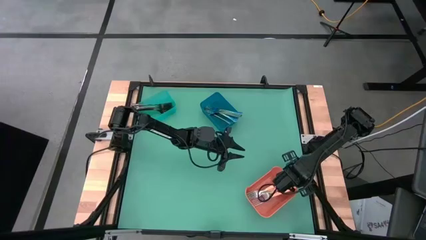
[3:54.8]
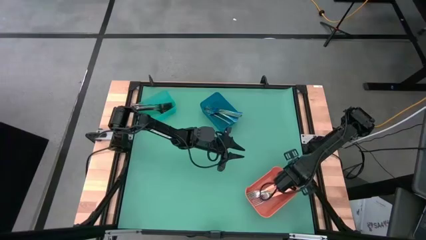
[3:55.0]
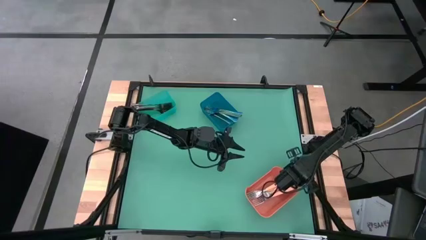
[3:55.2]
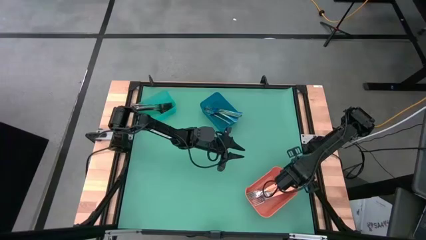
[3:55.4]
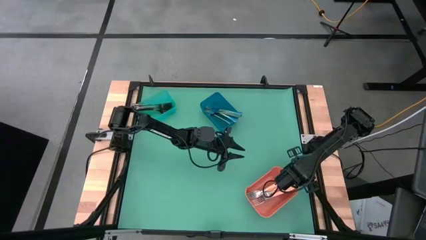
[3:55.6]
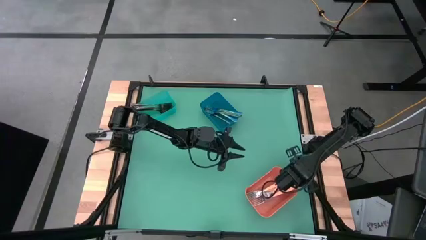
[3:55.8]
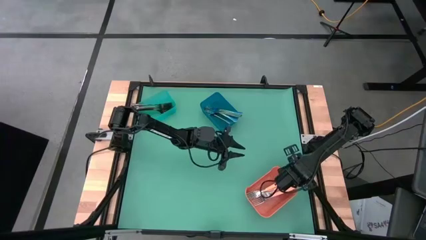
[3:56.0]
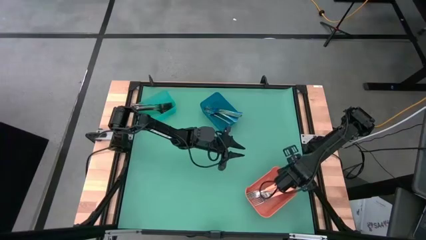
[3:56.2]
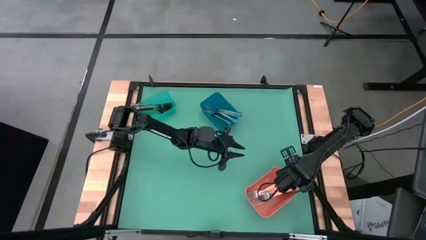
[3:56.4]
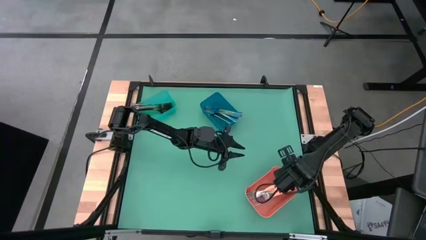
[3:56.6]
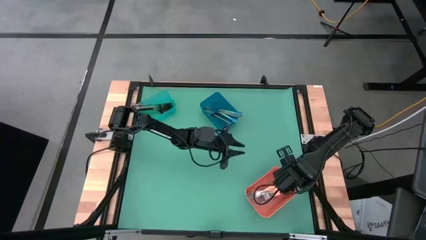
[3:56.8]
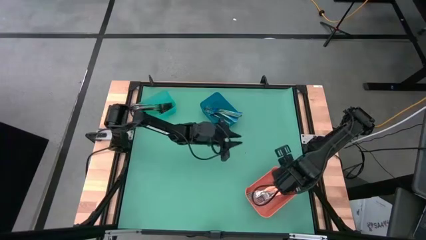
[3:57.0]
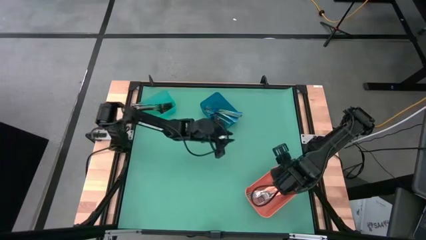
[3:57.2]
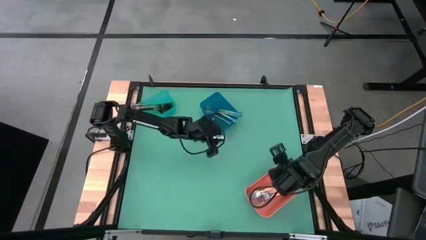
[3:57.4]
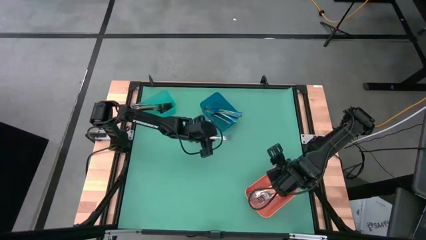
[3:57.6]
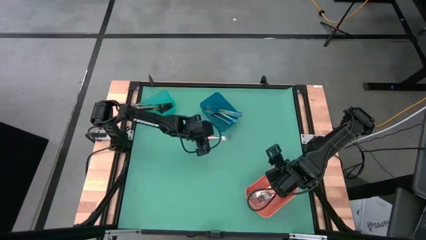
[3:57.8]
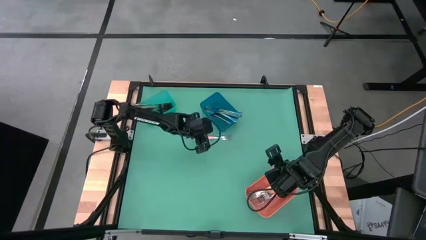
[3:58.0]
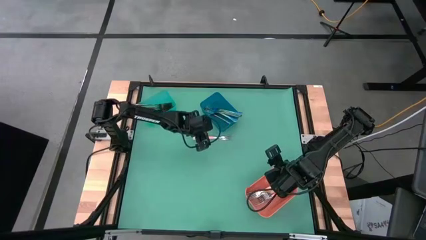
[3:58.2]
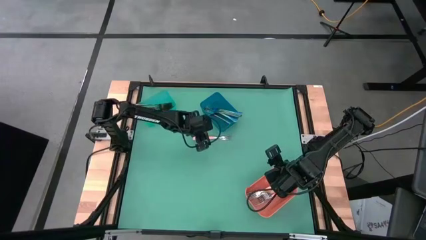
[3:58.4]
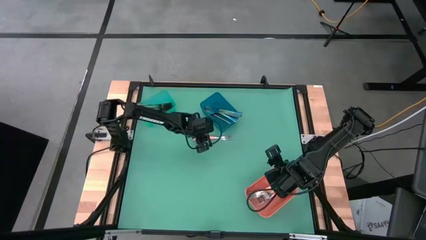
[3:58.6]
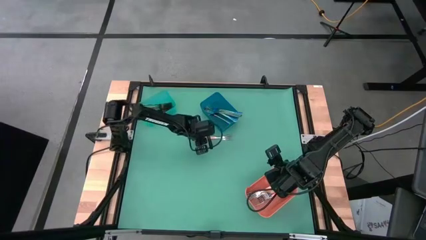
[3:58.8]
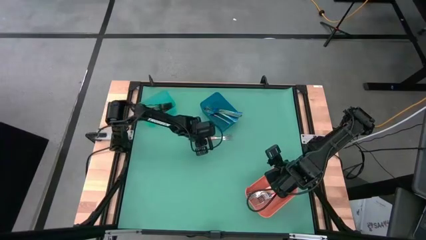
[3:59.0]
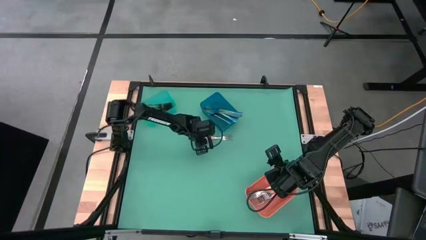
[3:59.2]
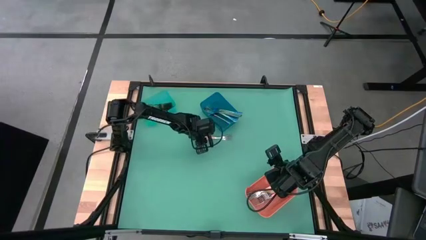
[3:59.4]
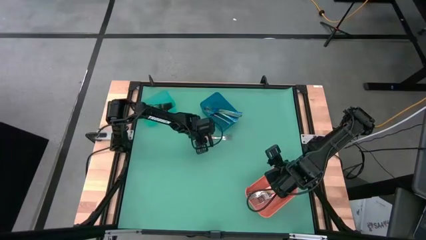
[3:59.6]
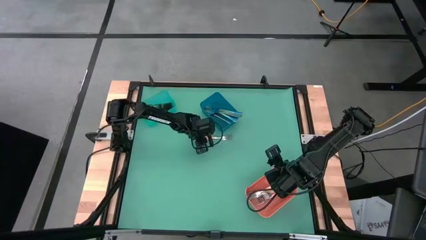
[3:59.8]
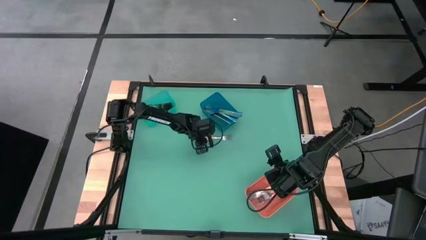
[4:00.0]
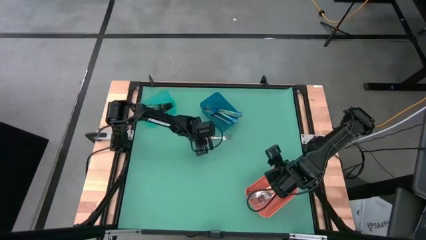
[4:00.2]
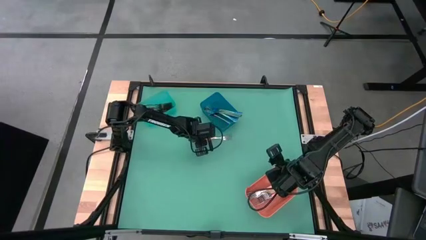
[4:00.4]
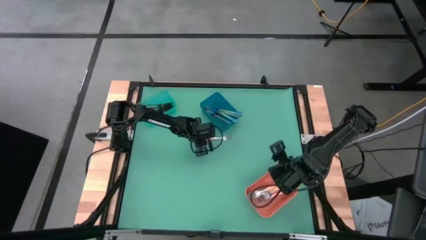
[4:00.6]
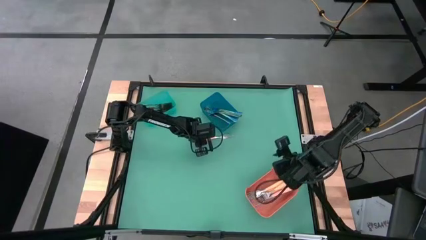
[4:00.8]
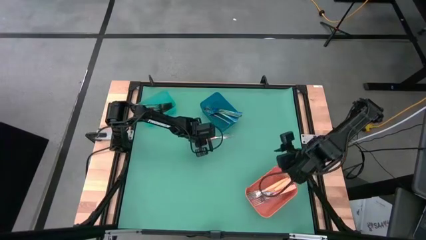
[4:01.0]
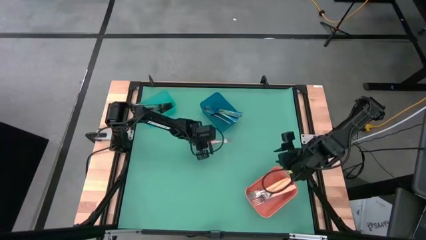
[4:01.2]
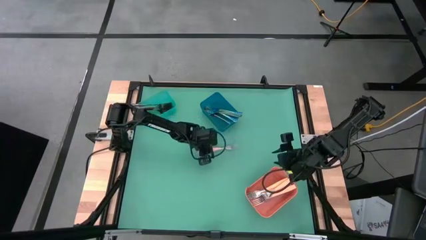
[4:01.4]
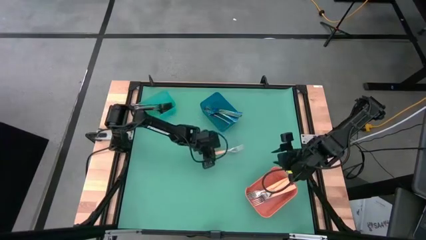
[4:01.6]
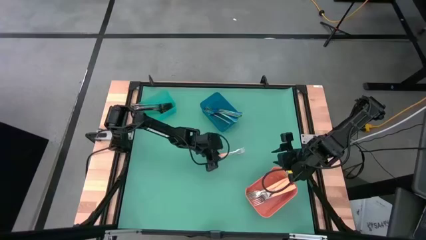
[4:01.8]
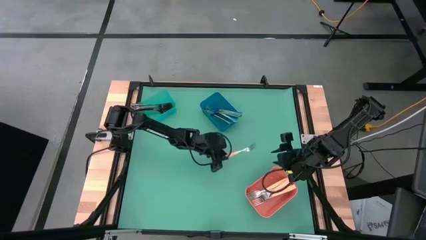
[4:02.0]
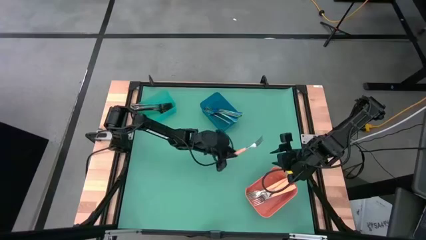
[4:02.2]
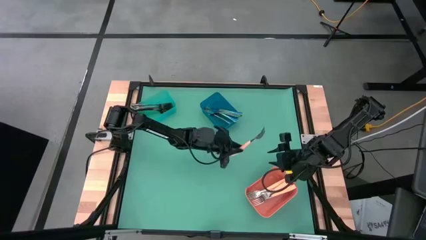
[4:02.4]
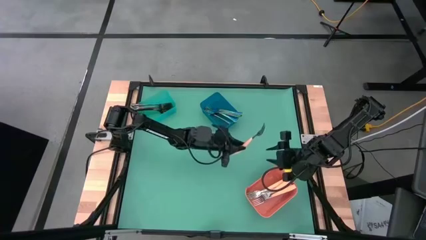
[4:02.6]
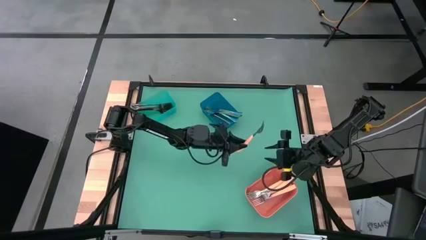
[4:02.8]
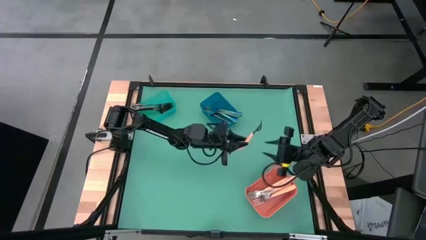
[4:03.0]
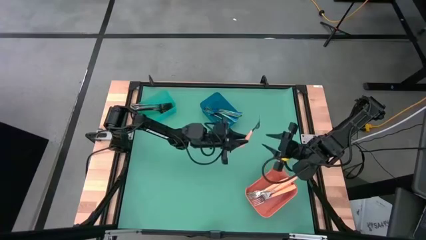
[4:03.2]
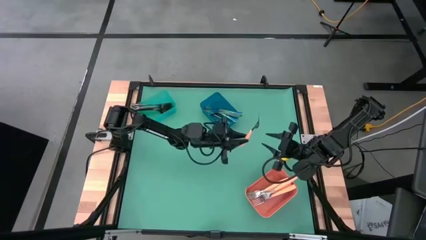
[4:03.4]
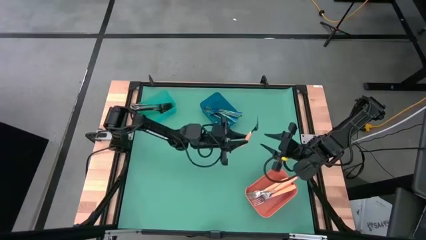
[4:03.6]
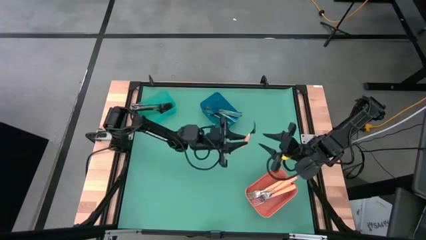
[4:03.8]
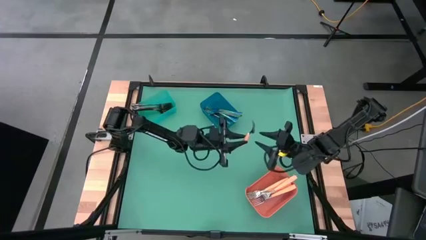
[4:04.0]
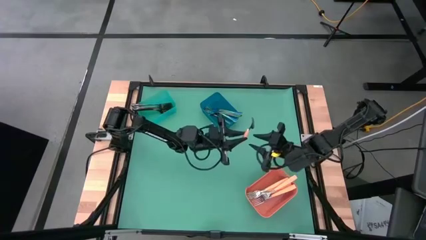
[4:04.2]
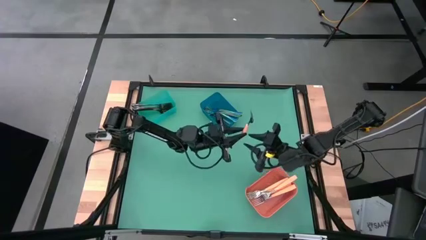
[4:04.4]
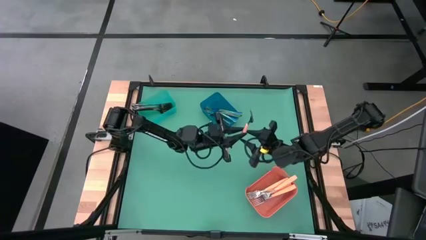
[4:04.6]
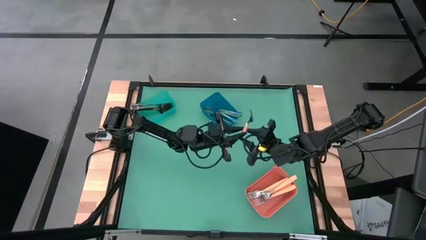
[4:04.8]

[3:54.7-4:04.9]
Task: Sort silverware by color (type)
Put the orange fork into the orange bin

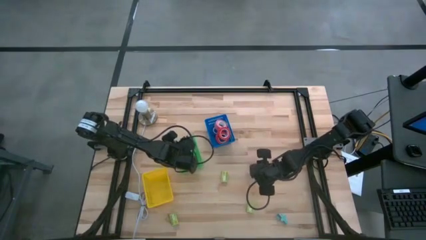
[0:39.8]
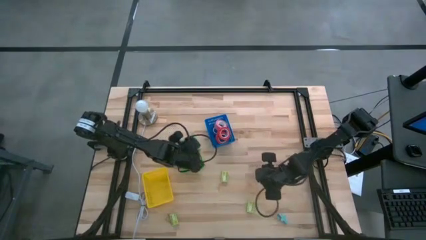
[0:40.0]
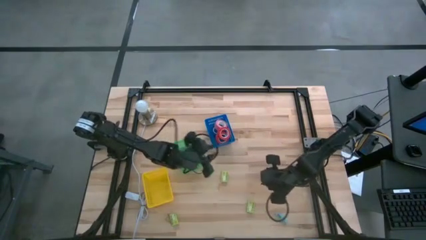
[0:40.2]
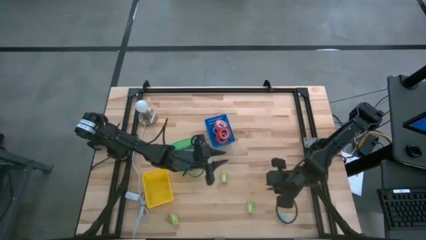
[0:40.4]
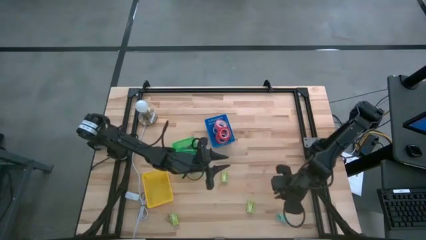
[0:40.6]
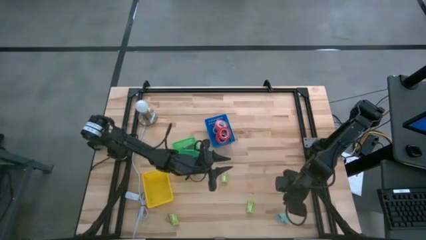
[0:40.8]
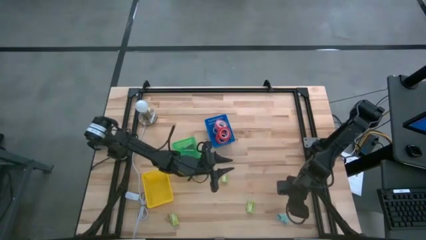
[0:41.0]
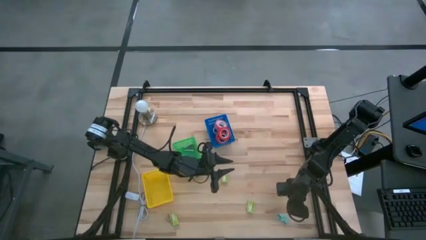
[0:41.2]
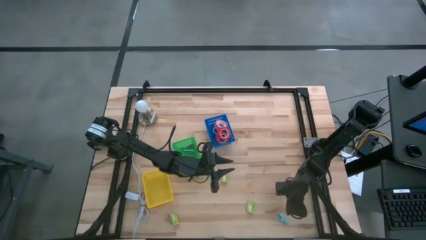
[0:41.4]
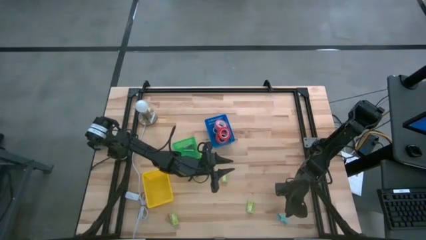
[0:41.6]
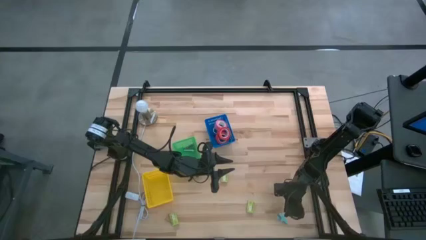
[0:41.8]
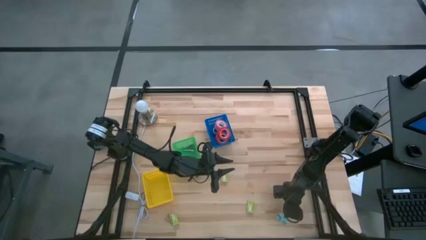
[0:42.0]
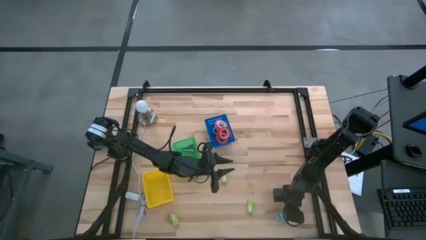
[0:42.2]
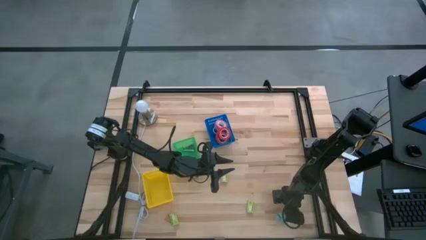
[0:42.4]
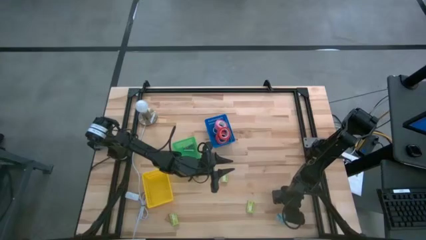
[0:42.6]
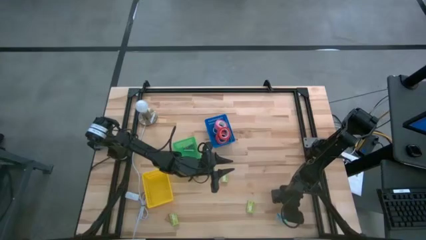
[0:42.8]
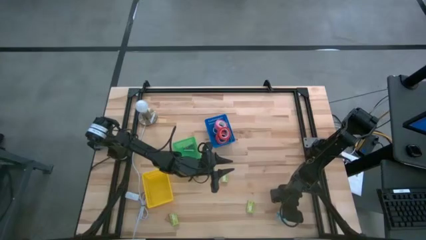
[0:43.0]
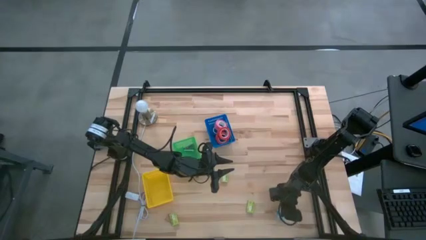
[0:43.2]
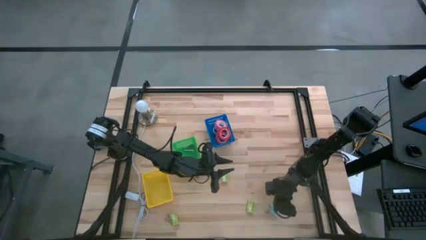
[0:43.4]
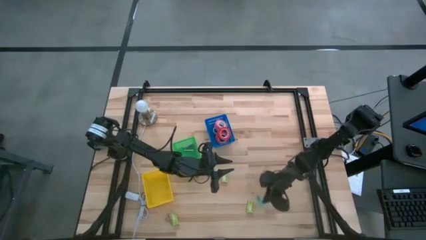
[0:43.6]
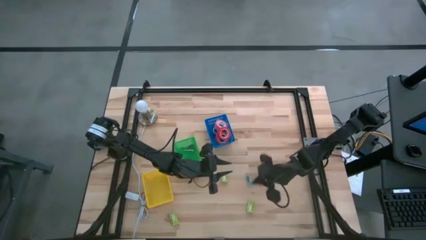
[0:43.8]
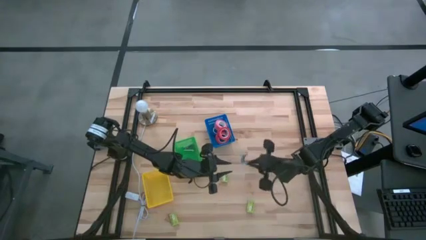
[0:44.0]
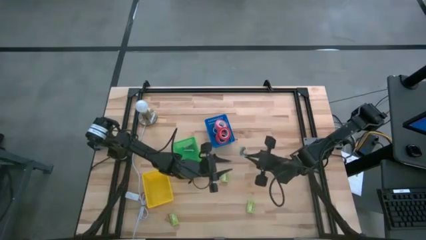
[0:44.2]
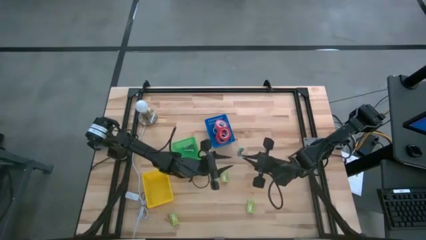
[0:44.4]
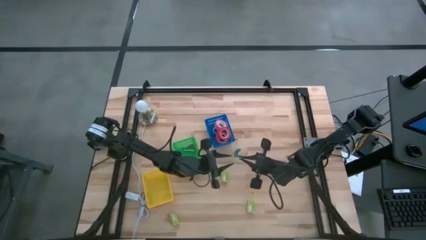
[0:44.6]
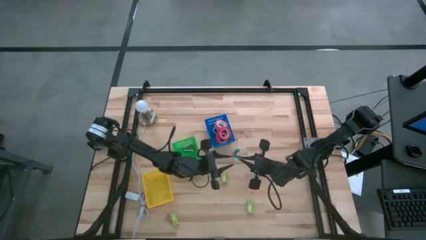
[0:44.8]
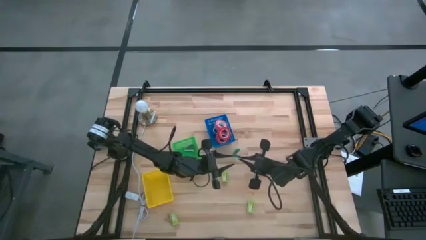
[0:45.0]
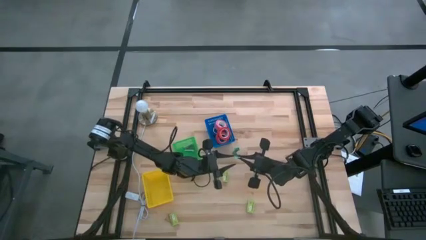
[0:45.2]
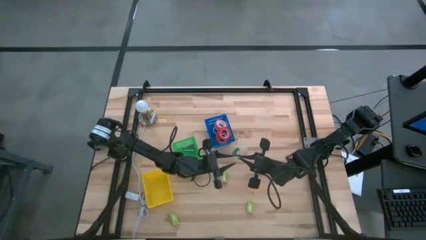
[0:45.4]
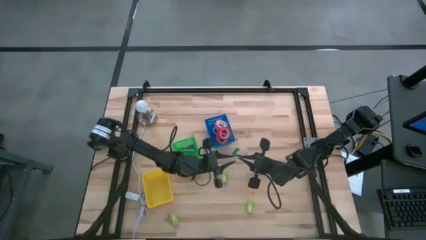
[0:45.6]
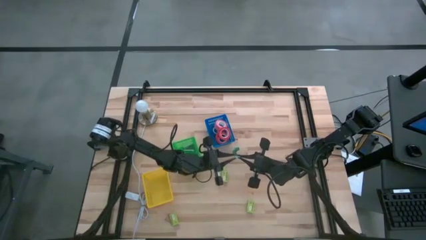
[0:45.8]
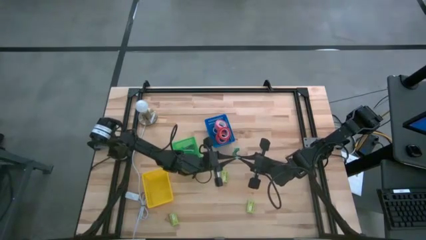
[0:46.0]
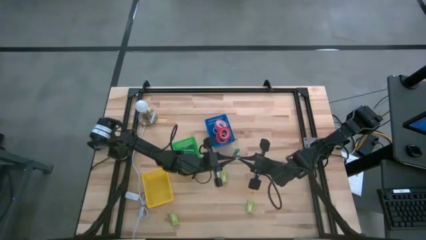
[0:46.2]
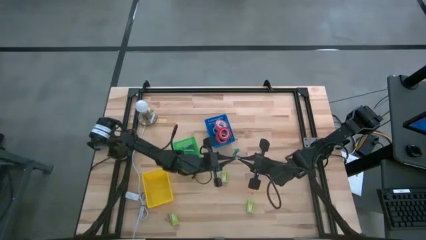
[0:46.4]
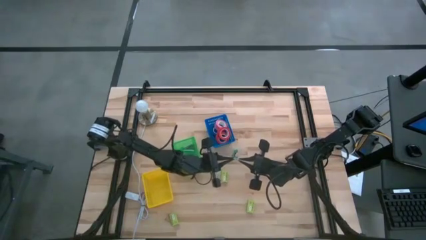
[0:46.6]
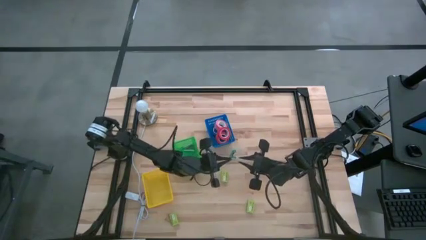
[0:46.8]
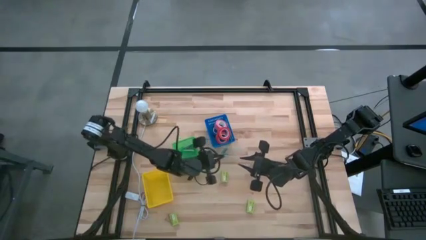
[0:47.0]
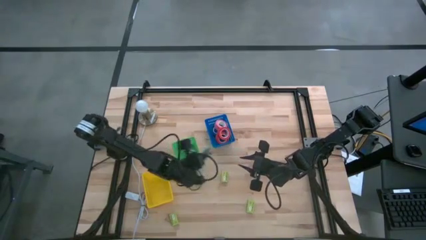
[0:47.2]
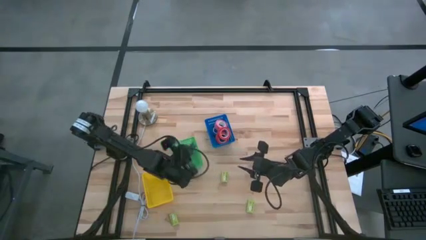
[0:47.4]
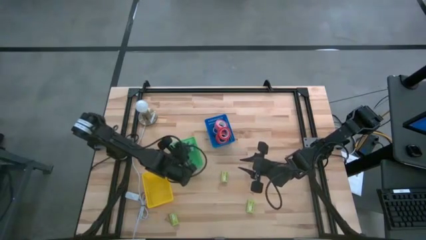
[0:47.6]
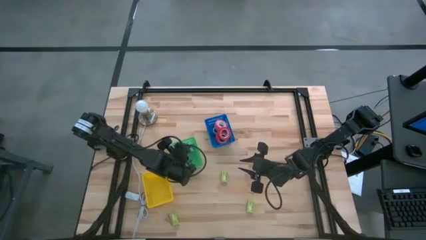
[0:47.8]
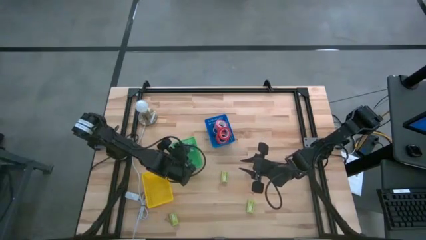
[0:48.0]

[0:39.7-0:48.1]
Task: Pick and place Stapler, Stapler remover, tape
Put the light blue staple remover into the green basket
